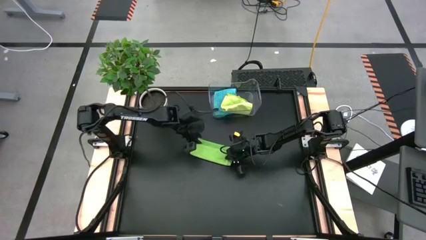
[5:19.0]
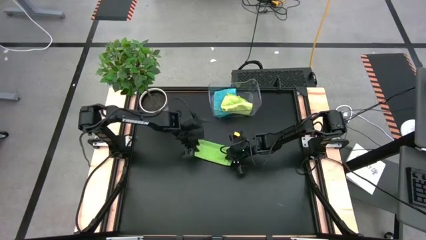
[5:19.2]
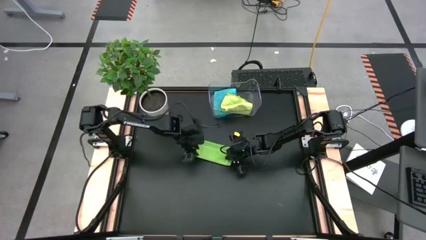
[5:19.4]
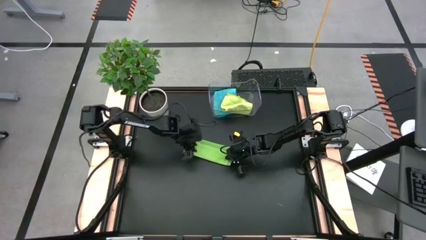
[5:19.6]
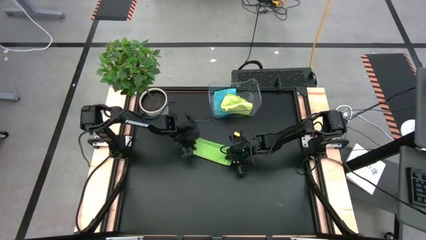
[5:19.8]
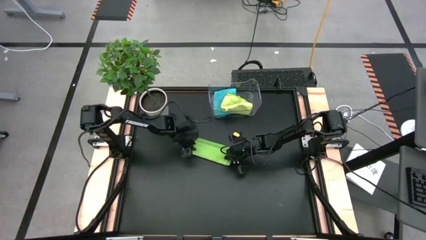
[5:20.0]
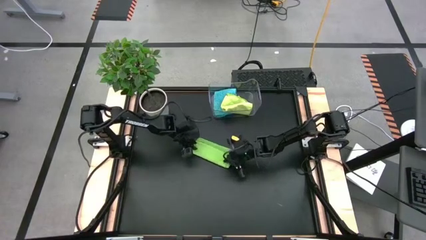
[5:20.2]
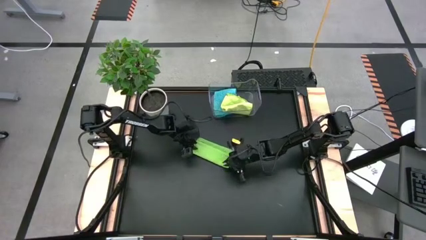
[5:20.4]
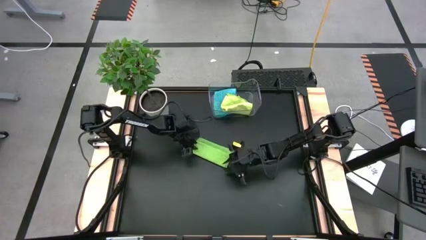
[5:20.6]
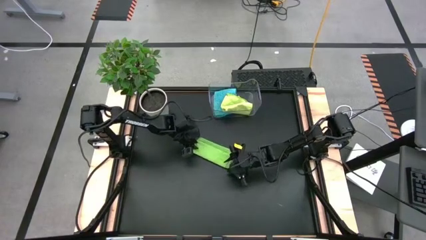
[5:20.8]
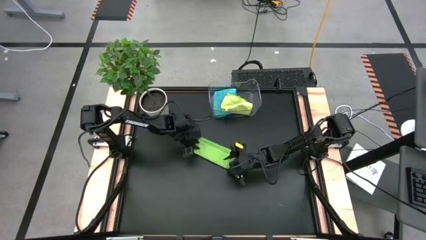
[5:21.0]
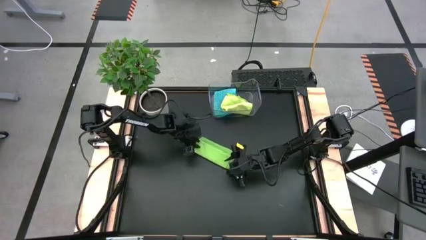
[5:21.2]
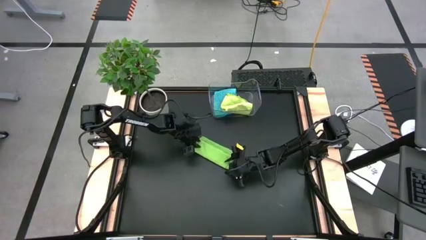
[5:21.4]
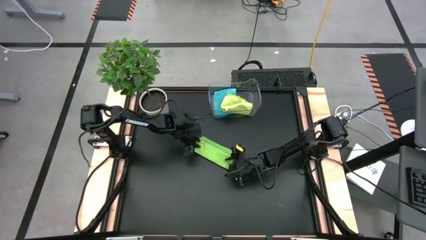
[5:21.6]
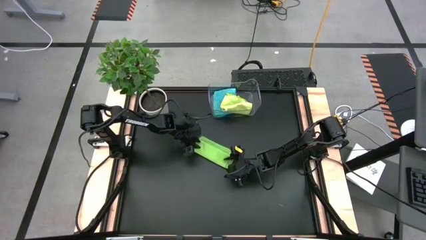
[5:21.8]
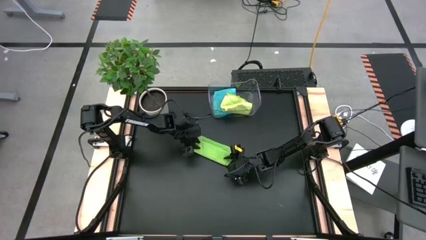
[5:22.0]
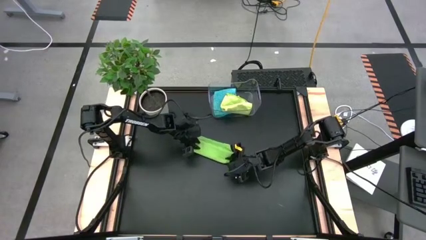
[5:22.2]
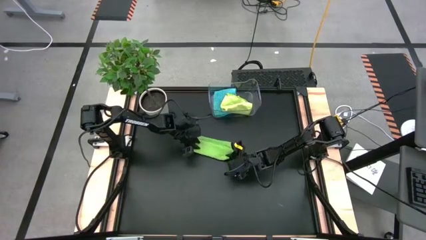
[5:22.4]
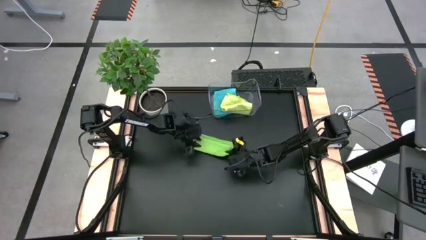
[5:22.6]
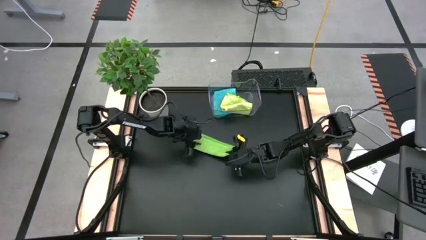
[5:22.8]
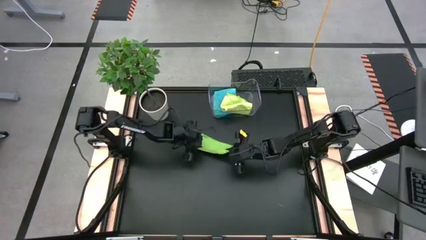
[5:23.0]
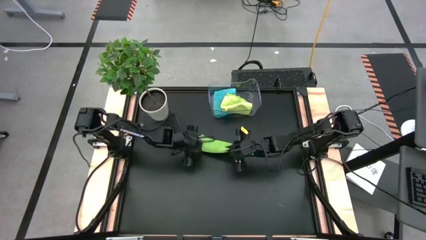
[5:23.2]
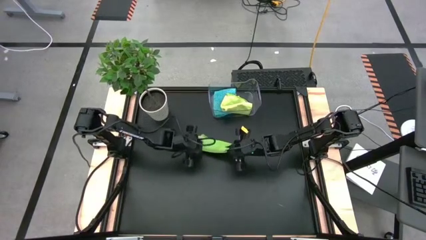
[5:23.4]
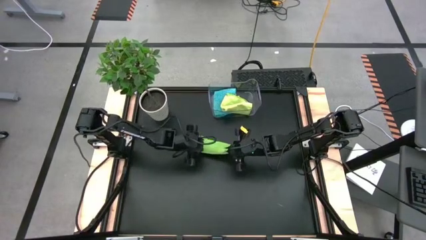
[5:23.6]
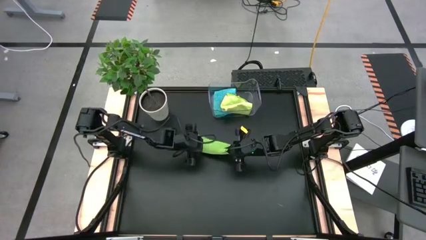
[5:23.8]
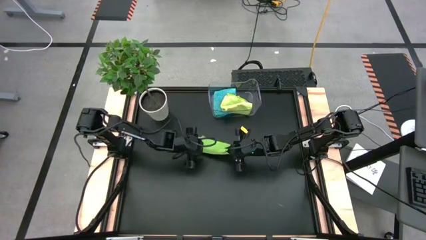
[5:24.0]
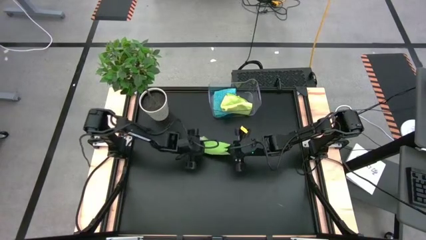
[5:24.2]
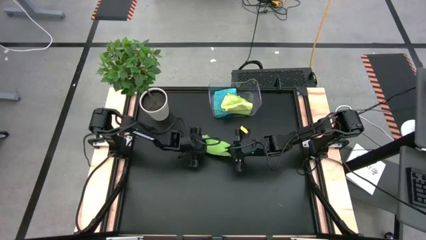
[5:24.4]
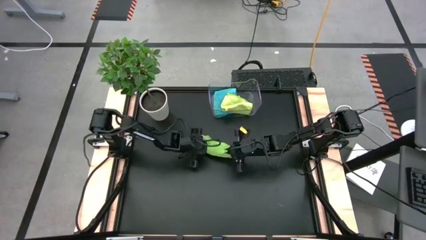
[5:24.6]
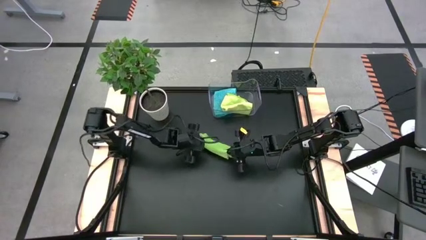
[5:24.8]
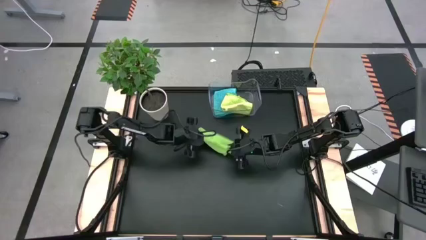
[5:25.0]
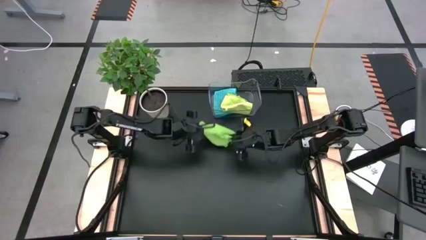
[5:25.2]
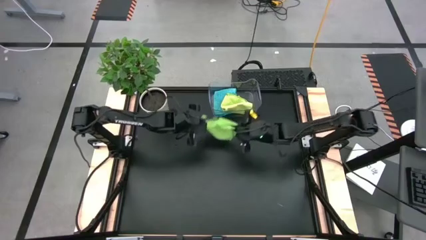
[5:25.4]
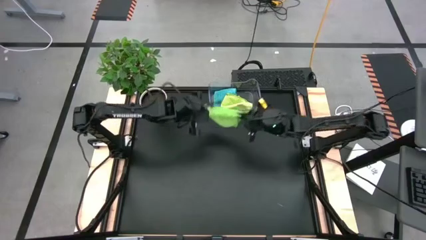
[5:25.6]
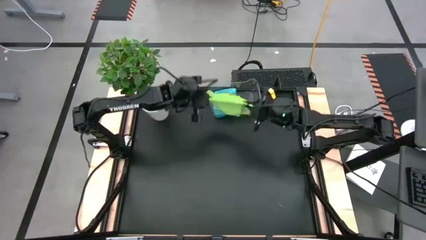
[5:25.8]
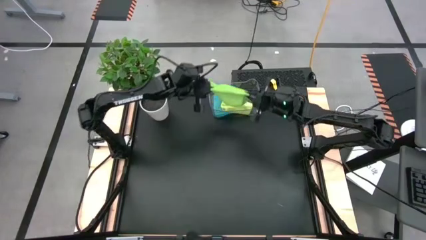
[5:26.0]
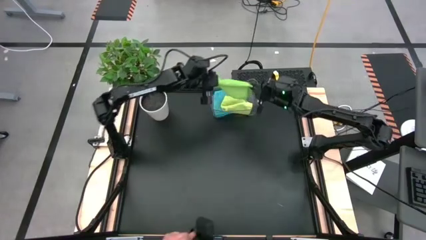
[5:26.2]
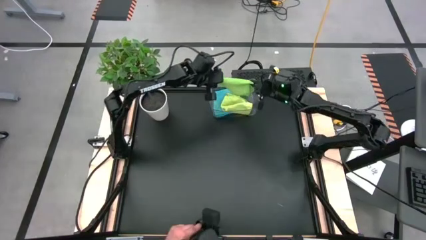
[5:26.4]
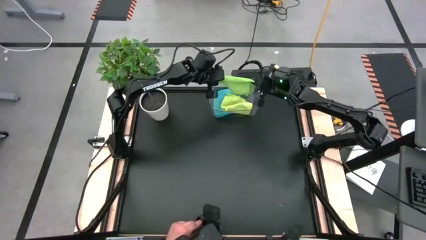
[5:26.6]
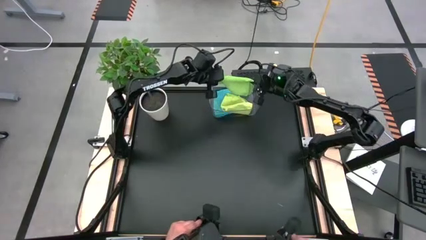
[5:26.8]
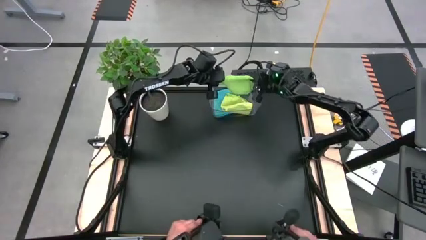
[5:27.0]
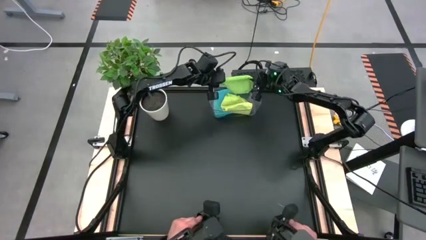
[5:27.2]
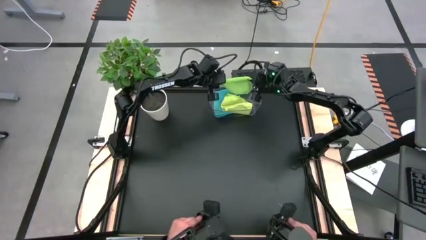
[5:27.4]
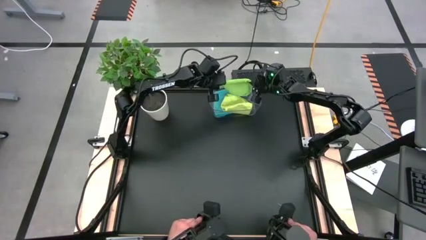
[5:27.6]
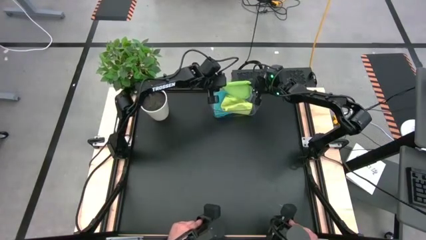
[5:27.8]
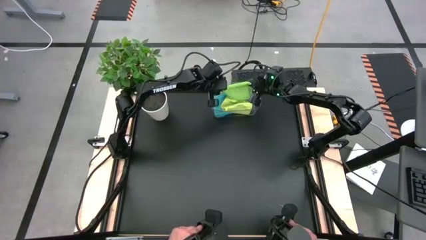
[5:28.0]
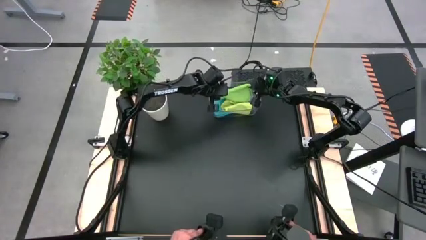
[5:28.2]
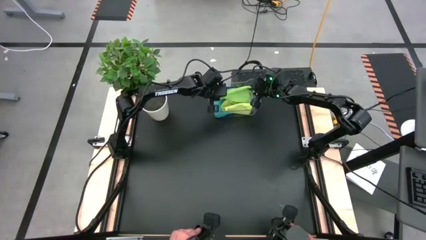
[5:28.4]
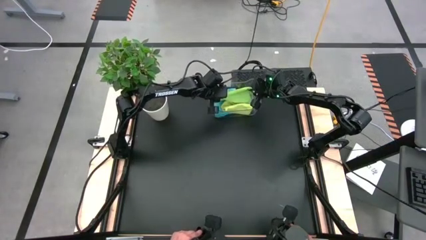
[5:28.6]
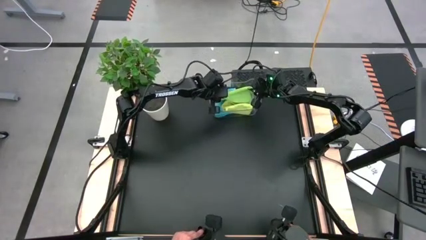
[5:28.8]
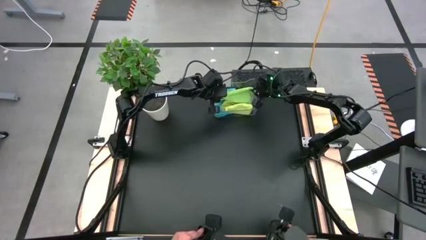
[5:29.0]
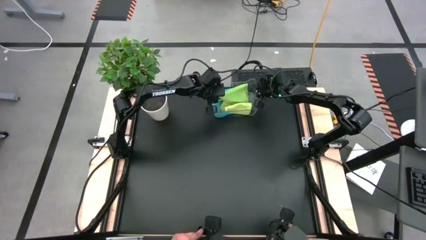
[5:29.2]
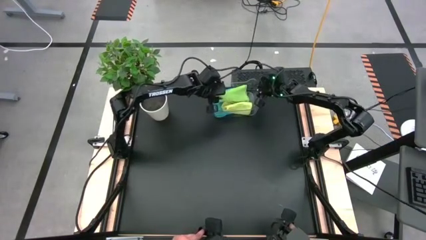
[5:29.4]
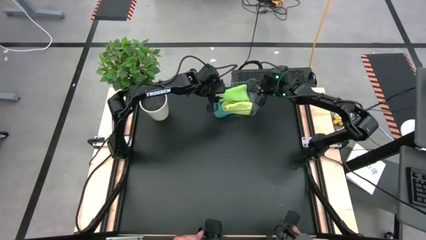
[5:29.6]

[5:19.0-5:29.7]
Task: Fold microfiber towels
Put the green microfiber cloth into the transparent bin

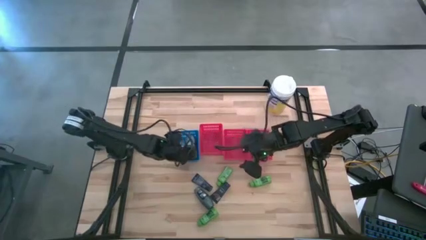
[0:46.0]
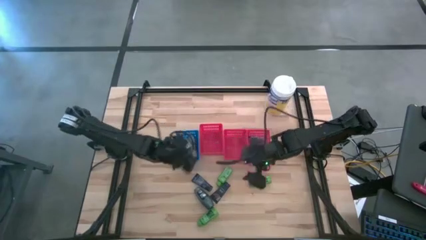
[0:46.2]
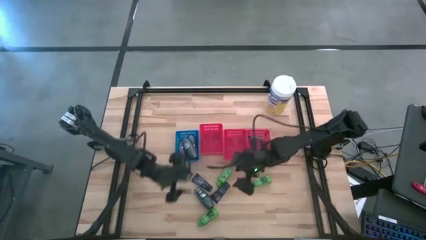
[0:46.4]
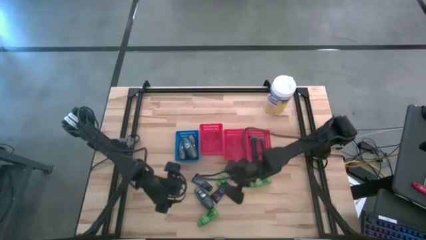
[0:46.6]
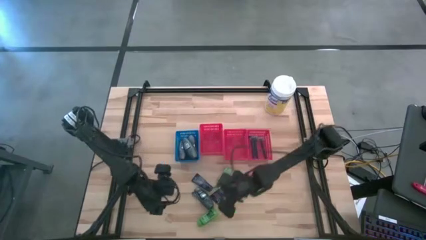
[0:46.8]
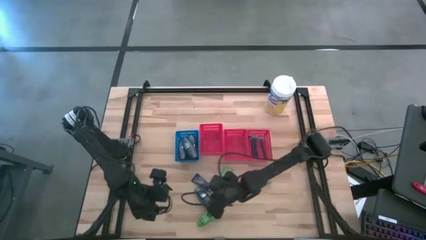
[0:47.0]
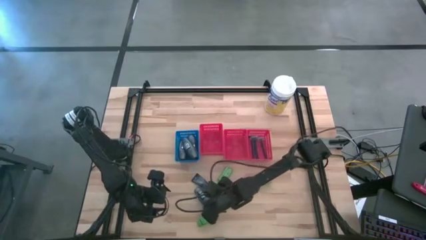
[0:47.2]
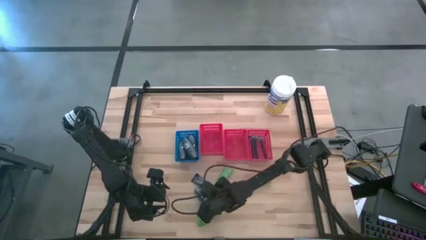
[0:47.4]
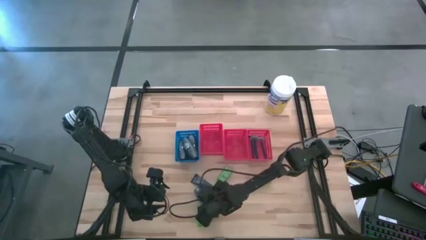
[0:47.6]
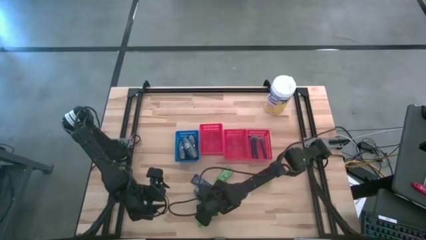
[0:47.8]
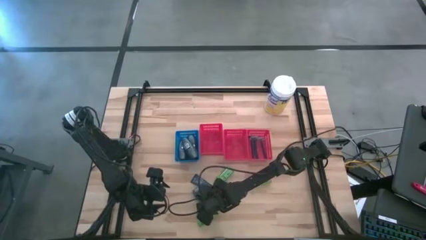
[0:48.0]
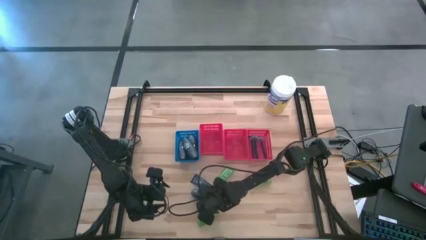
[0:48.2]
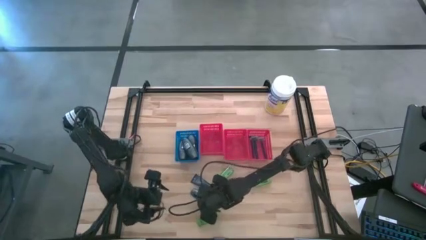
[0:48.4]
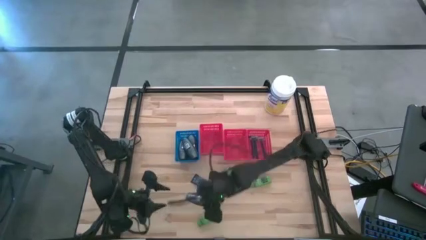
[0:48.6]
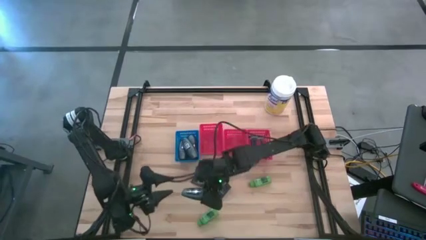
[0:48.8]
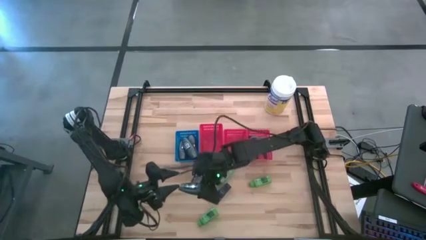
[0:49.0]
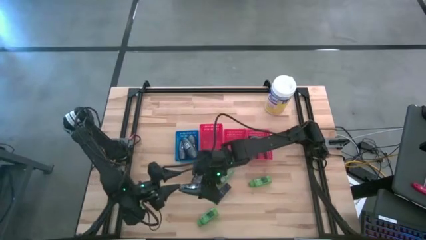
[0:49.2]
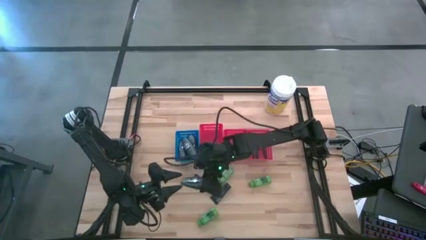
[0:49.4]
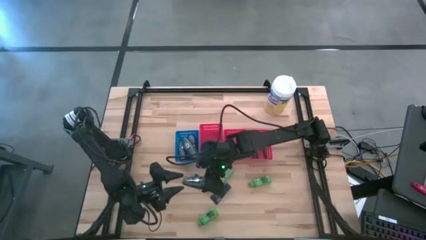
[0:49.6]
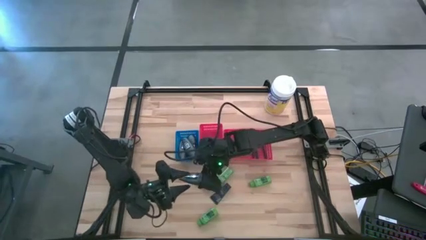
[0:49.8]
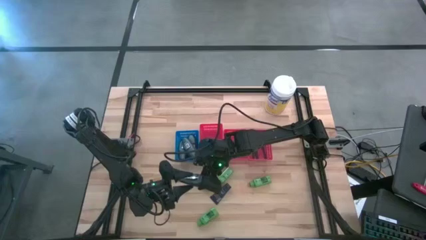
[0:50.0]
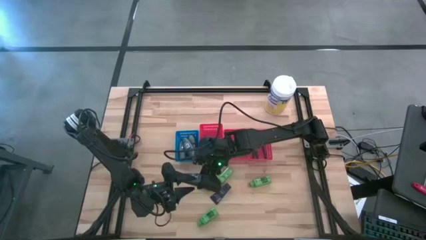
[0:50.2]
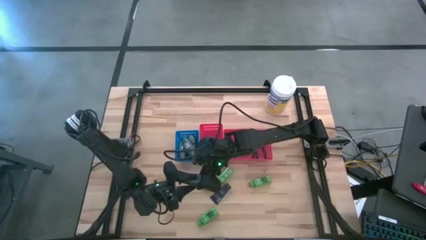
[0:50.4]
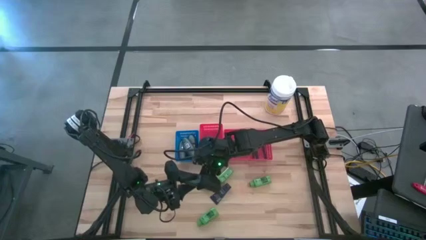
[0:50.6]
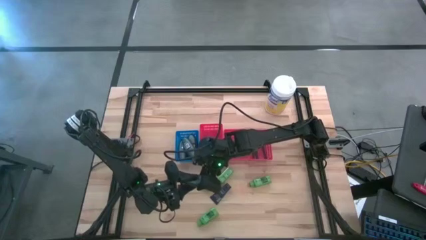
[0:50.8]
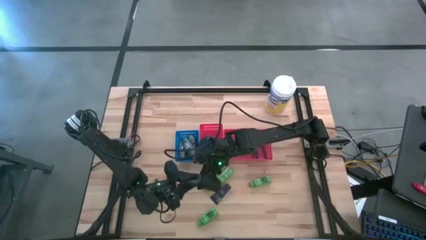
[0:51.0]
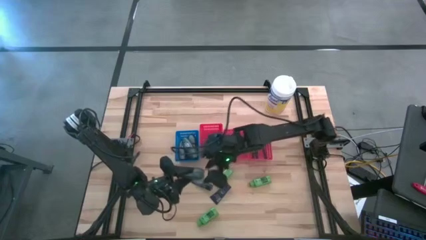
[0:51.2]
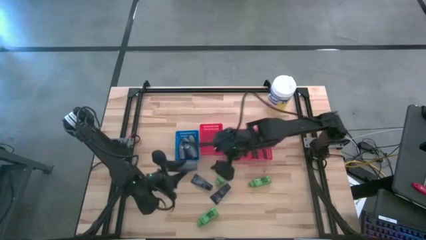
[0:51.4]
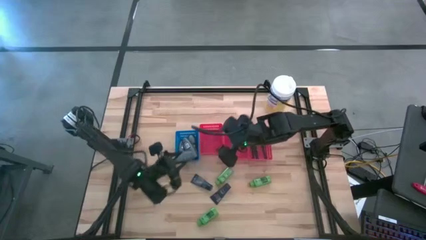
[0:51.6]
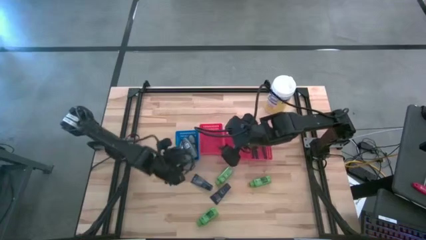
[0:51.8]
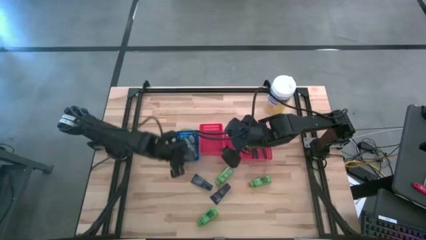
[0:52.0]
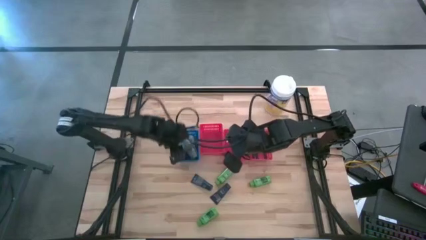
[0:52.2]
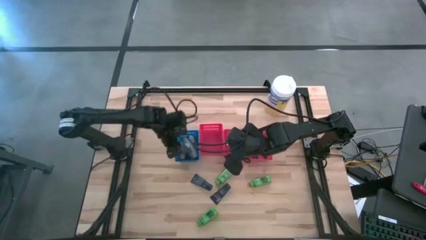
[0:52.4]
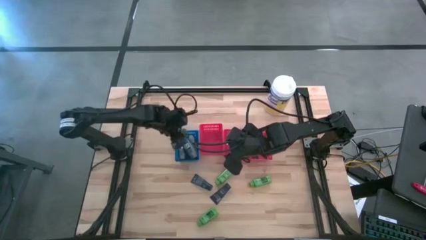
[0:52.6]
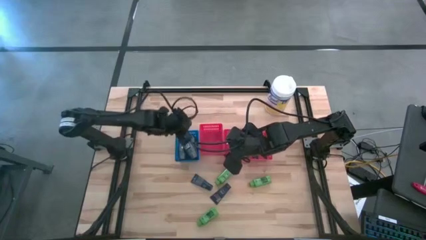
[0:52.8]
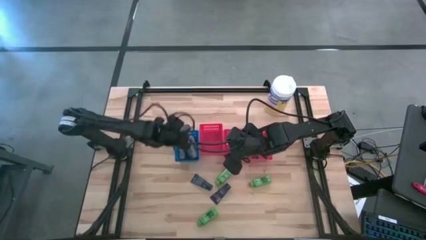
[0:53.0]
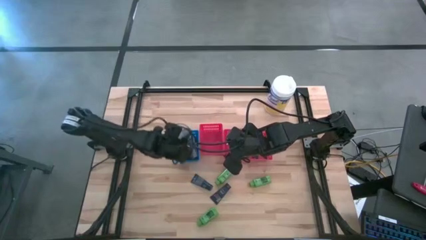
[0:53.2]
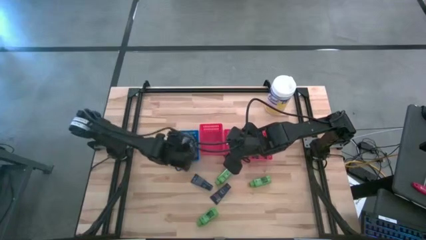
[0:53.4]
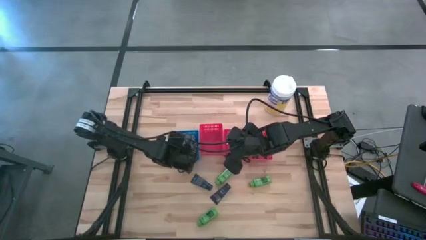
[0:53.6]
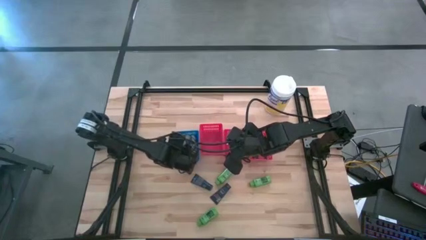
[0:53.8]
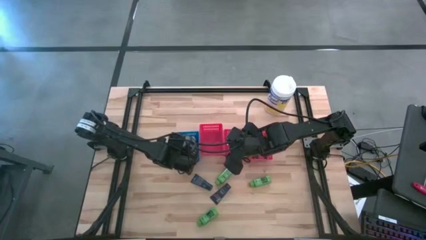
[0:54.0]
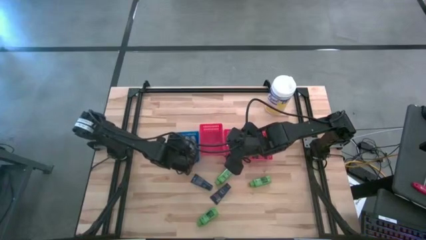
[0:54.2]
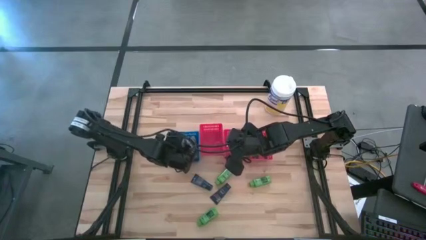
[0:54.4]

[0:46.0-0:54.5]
Task: Pick & Place Travel size toiletries
Put the gray deodorant into the blue bin
